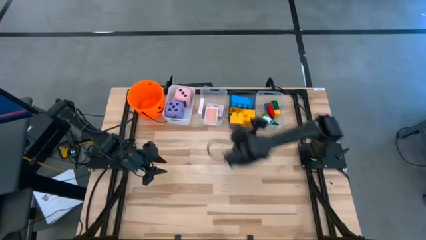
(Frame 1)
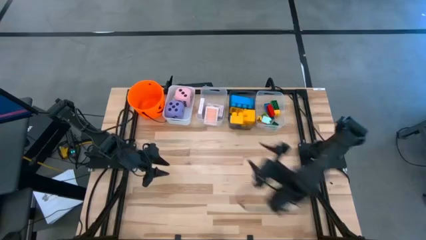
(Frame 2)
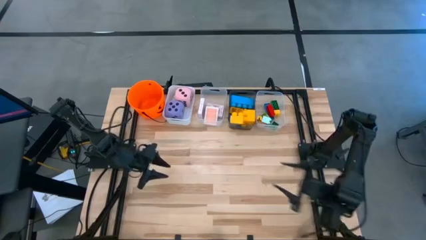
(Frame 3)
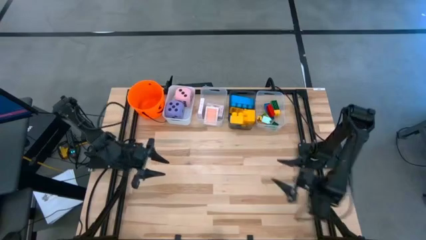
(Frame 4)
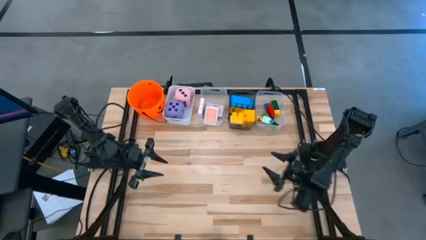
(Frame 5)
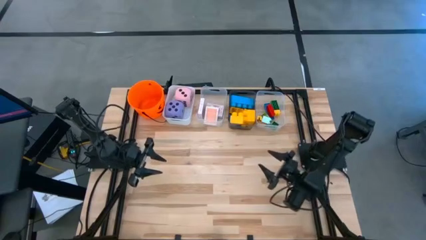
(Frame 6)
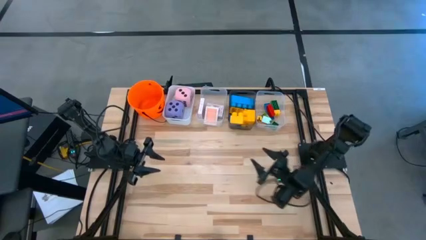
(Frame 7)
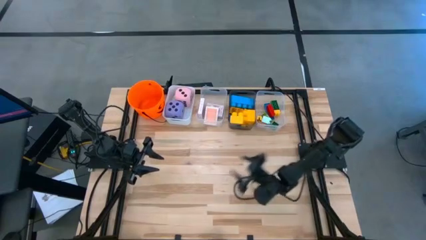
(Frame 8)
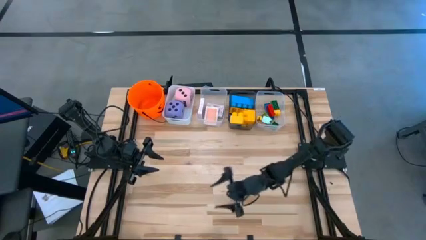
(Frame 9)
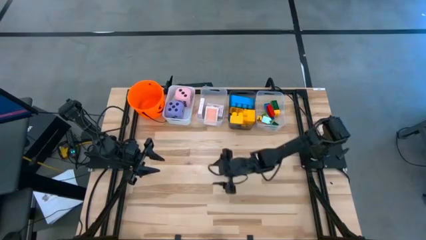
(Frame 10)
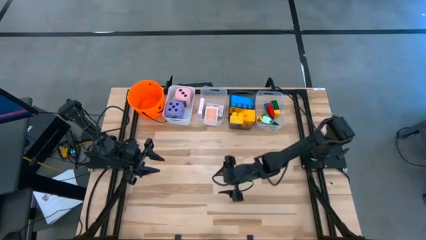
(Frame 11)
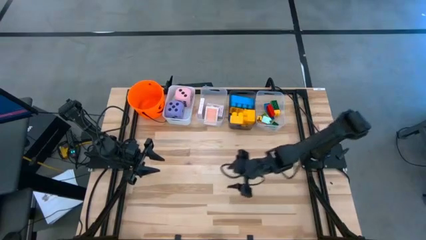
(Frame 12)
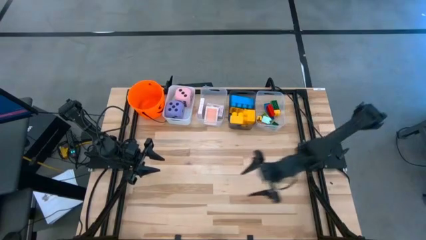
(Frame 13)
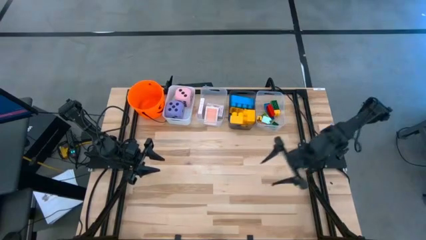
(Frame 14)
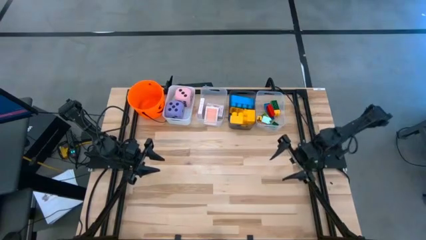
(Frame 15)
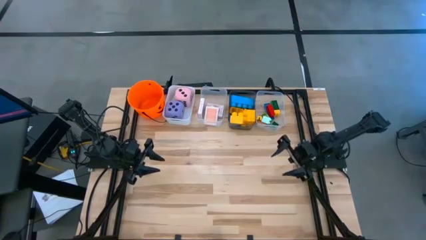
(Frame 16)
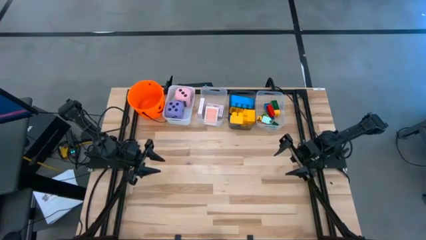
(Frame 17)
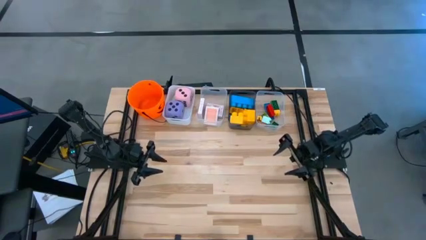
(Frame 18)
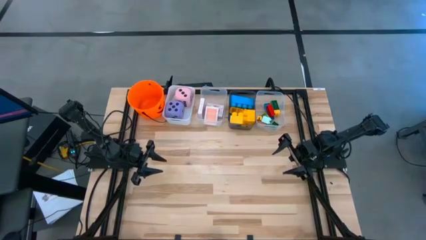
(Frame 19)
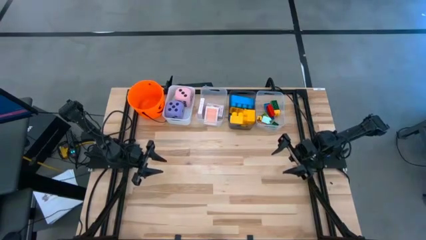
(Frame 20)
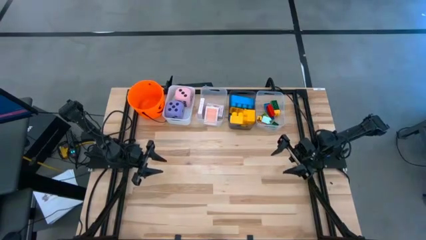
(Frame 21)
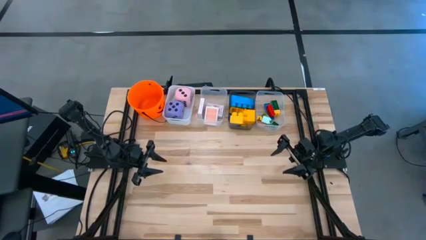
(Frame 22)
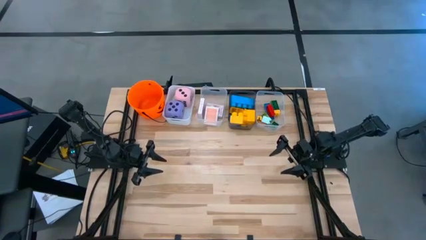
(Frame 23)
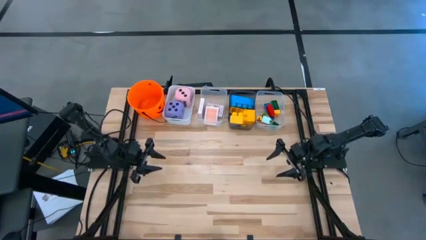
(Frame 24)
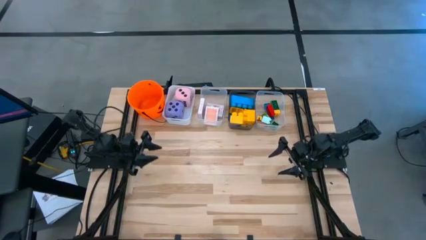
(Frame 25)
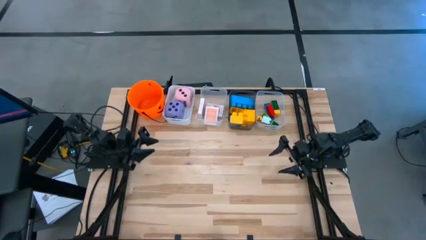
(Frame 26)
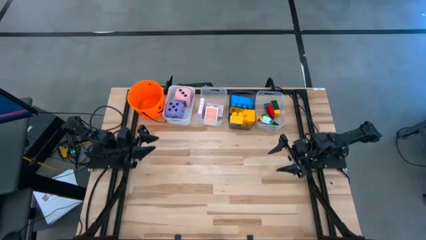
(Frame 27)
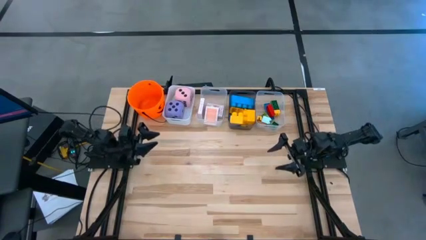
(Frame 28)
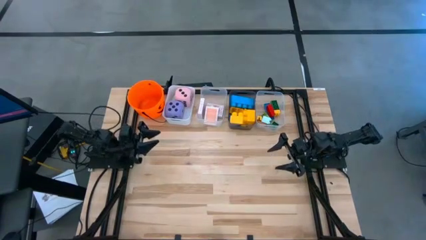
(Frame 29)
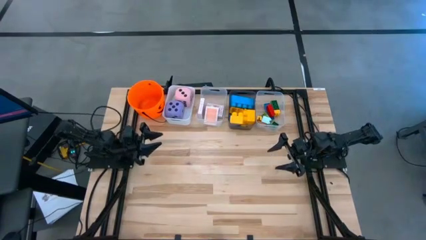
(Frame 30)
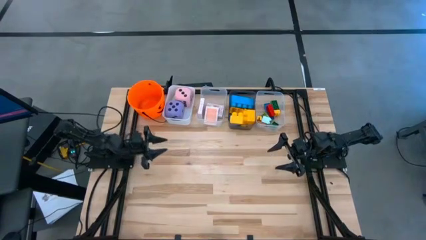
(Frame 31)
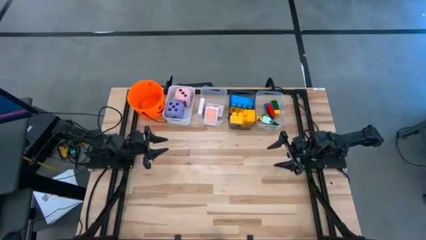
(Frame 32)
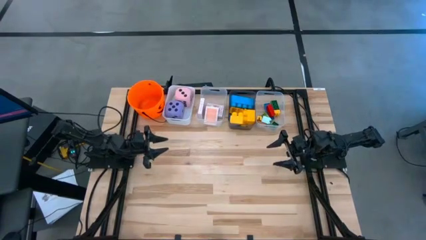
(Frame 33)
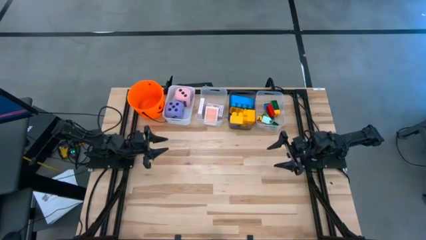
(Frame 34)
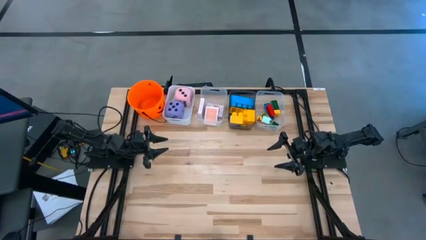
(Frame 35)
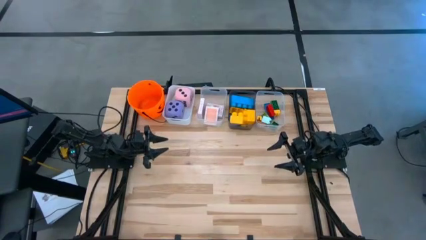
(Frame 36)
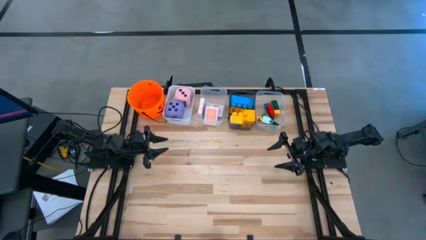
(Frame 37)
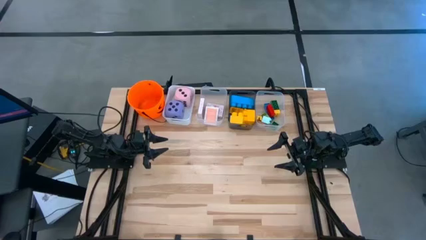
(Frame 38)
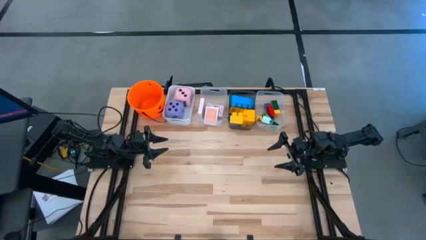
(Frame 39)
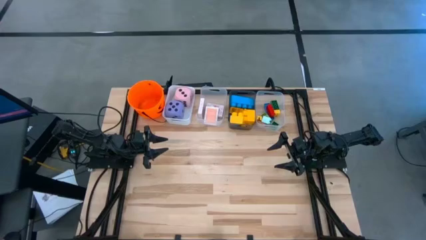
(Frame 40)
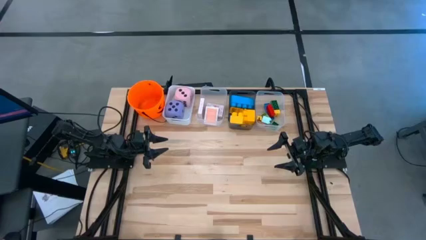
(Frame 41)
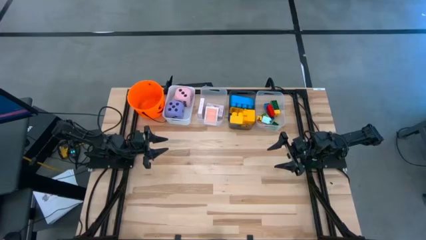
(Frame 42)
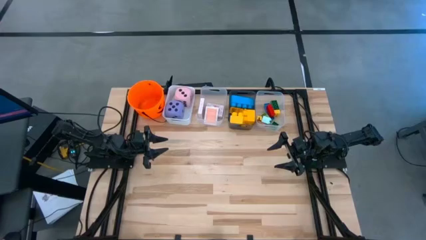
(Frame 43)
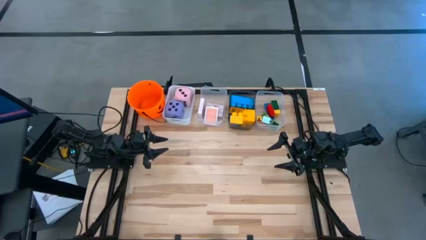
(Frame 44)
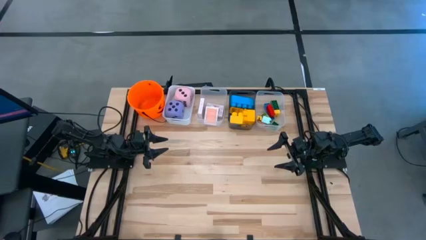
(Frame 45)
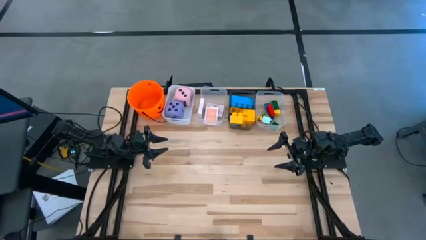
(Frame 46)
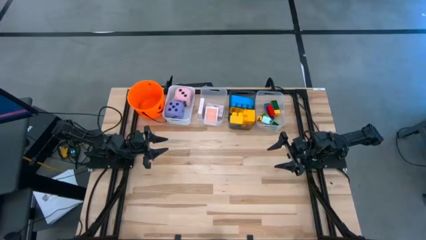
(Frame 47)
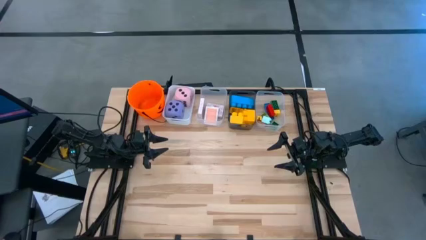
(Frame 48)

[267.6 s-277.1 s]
Task: Pick & Place Toys
Return to Home Position

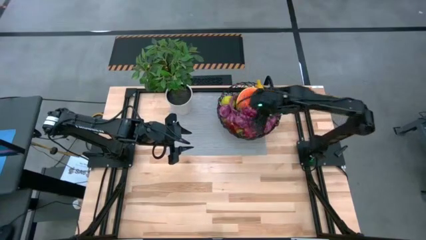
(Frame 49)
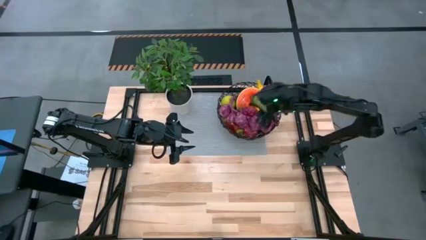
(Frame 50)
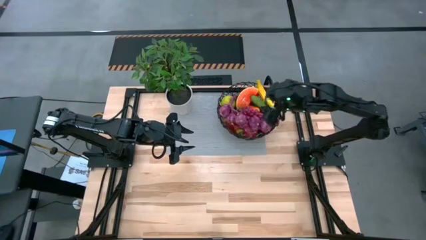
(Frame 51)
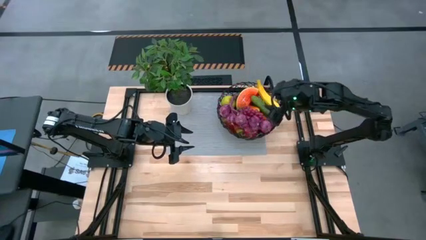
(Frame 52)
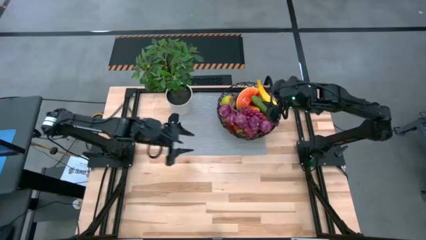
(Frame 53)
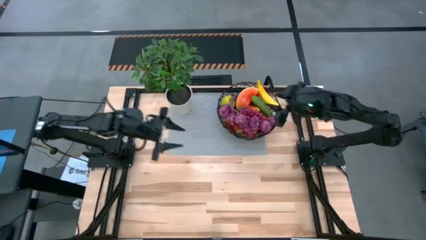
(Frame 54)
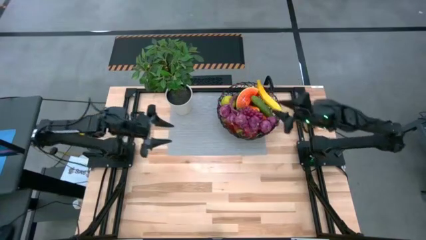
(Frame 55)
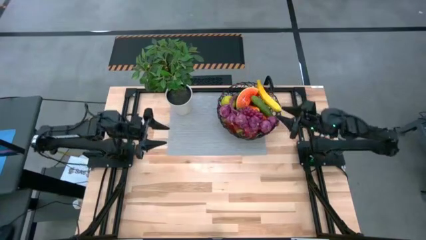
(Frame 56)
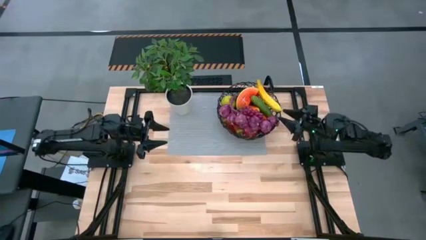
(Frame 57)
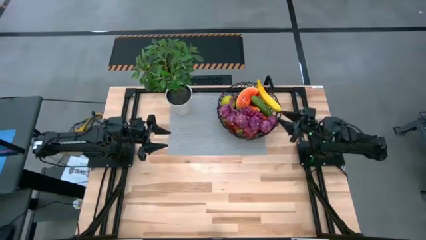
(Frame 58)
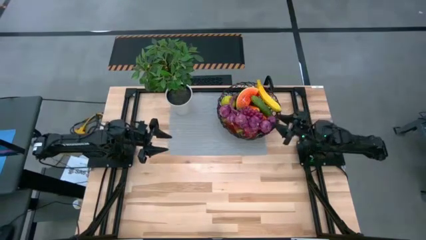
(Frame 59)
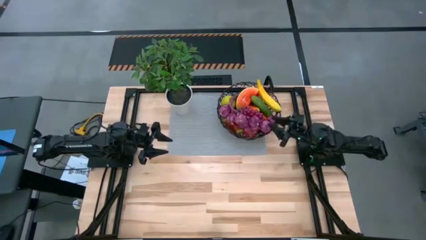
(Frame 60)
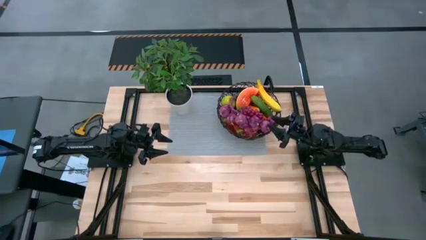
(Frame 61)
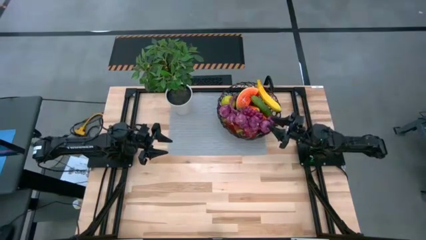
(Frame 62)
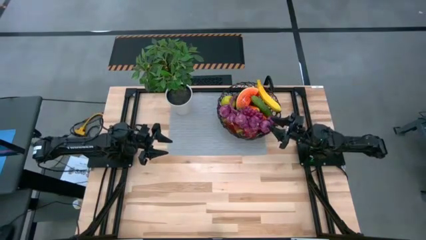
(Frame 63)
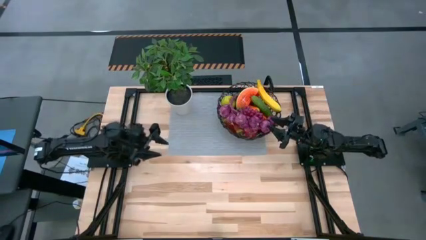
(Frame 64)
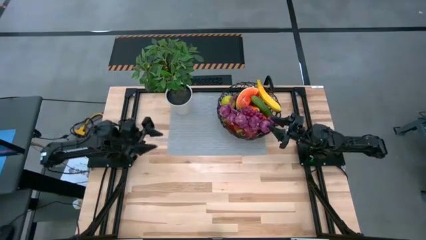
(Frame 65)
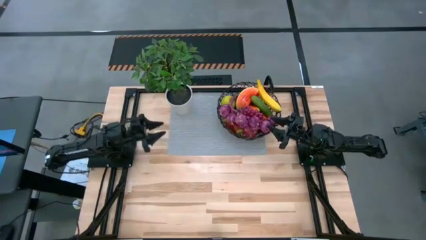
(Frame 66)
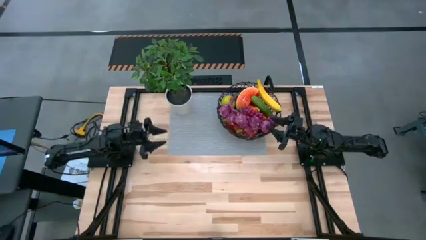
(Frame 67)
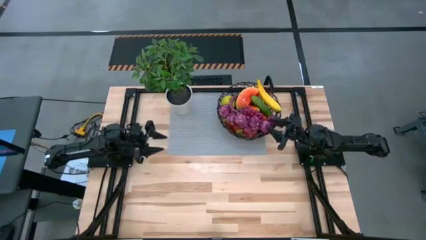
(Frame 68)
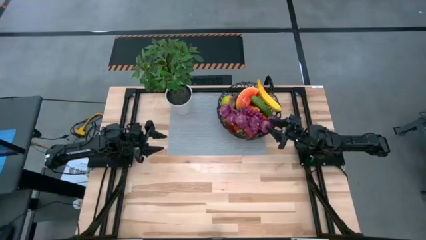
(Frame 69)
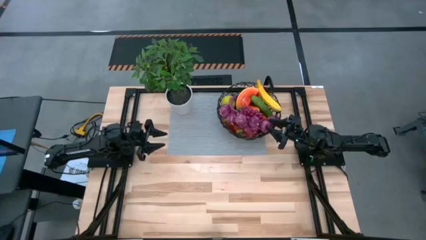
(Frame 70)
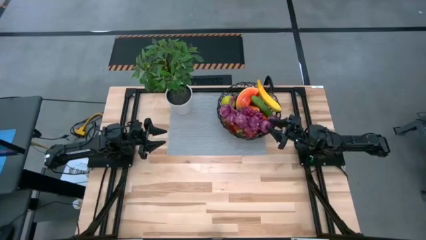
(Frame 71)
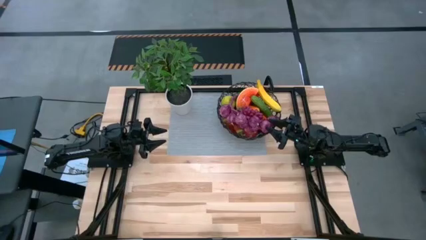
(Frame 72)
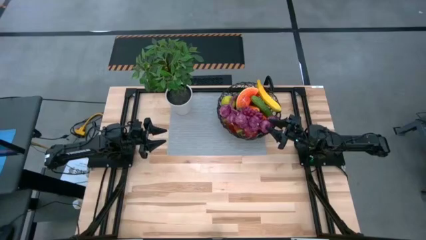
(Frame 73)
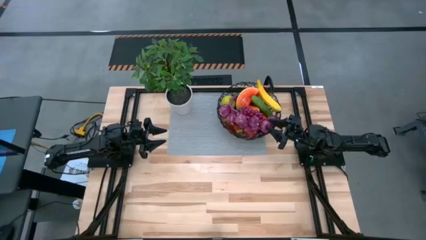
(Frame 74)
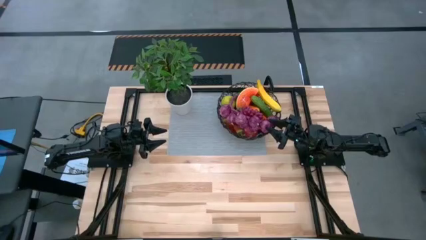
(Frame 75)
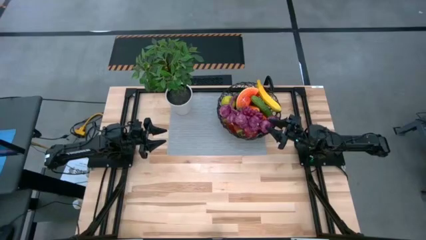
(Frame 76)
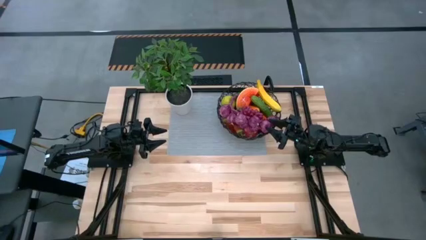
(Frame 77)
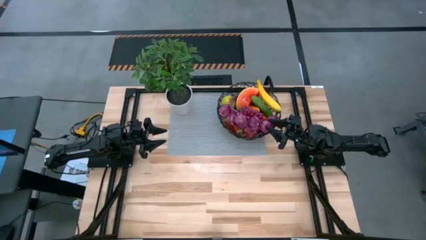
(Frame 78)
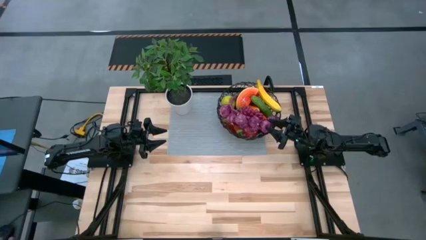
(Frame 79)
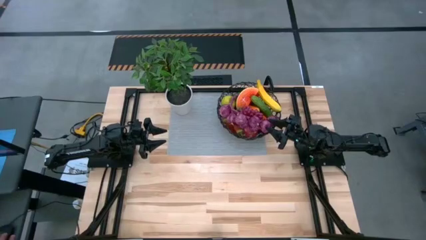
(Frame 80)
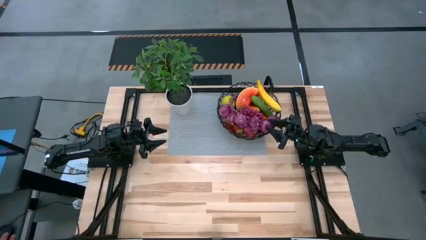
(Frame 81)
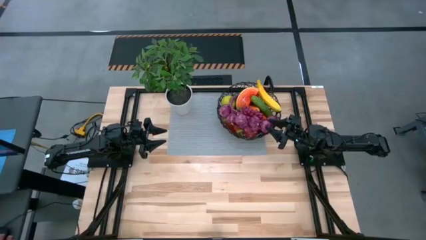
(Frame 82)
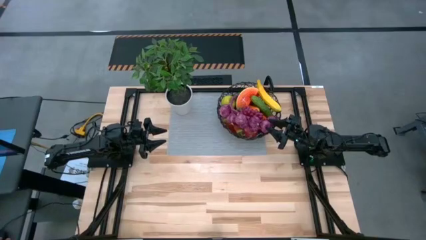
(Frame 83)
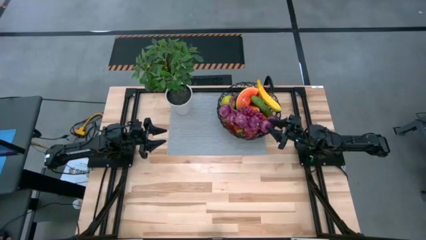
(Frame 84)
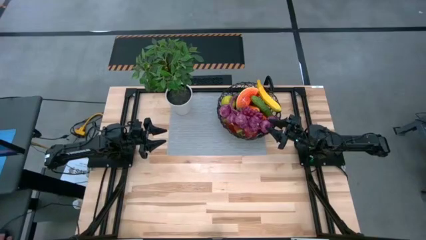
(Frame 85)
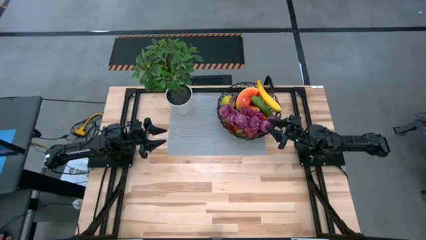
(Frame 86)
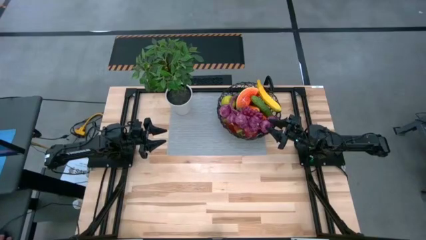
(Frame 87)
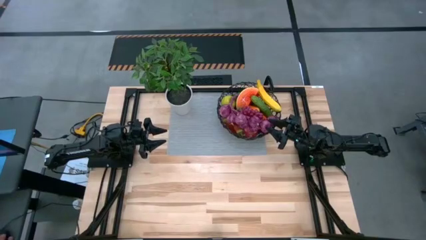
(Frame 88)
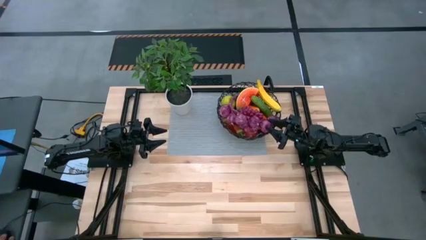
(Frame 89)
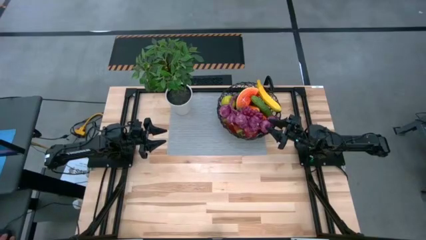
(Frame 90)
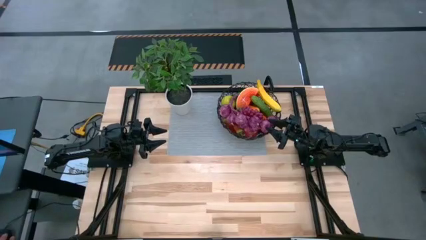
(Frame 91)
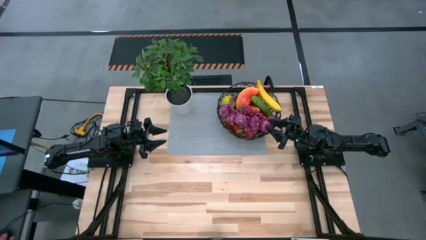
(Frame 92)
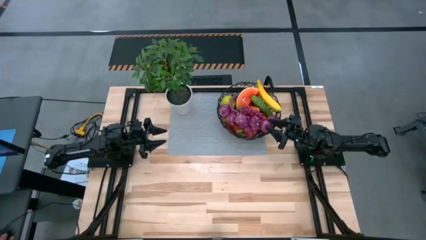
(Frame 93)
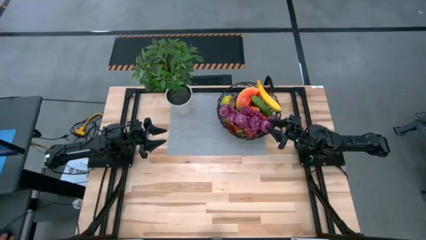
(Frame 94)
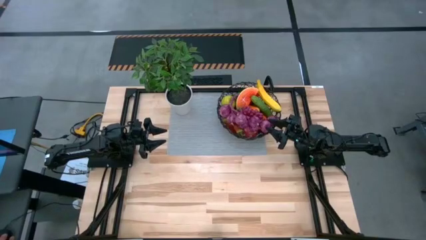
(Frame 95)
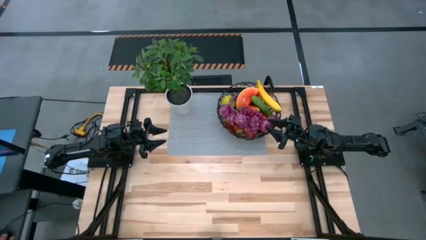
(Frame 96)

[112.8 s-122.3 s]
Task: Build produce basket
Return to Home Position
